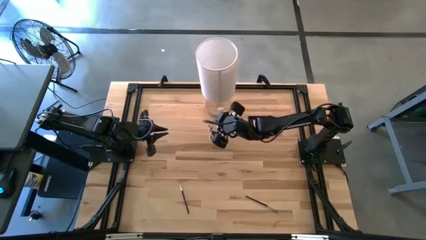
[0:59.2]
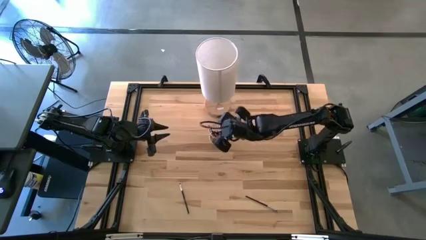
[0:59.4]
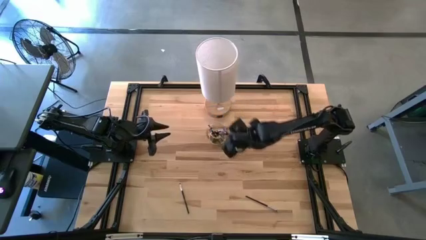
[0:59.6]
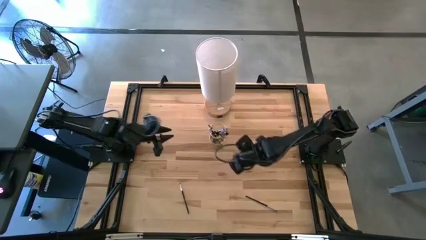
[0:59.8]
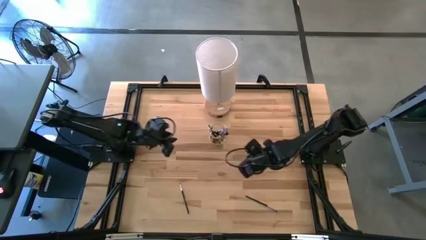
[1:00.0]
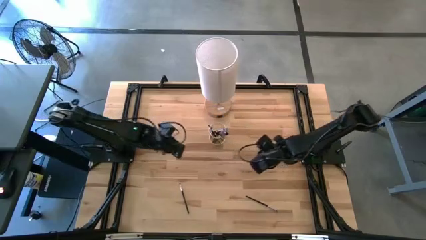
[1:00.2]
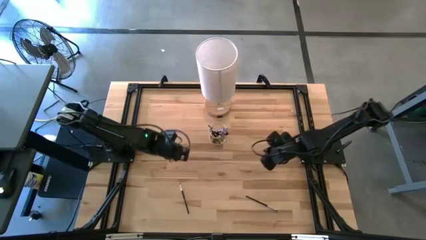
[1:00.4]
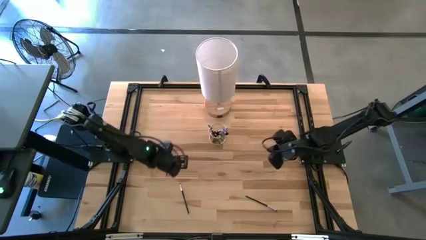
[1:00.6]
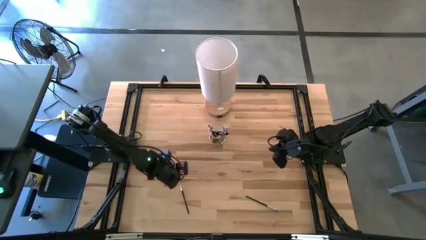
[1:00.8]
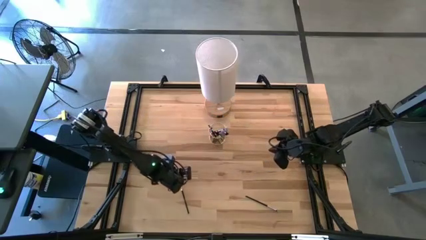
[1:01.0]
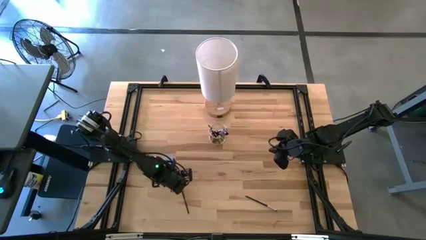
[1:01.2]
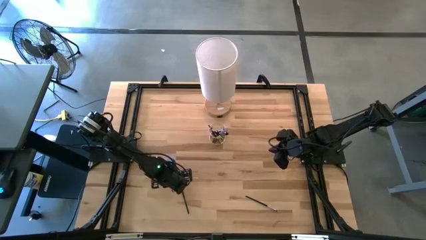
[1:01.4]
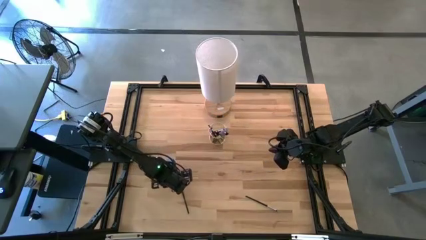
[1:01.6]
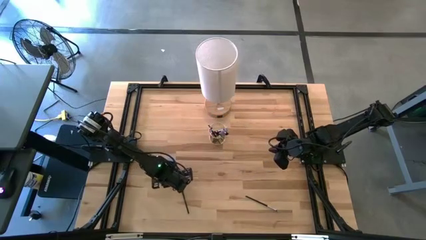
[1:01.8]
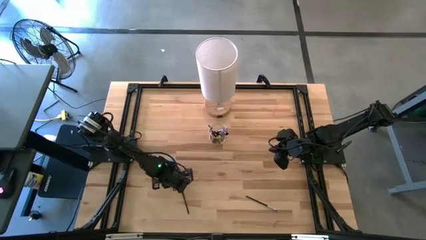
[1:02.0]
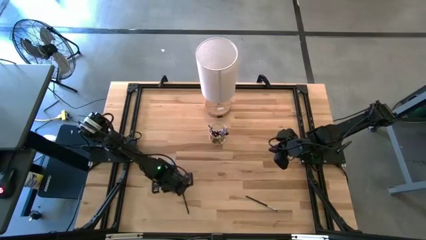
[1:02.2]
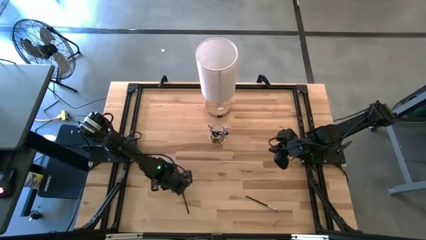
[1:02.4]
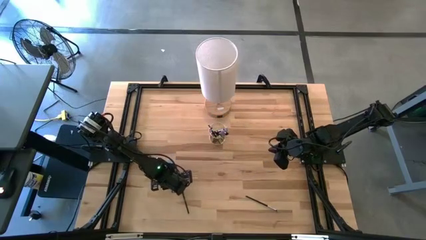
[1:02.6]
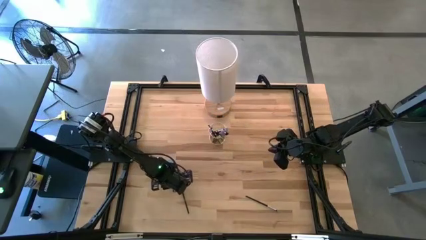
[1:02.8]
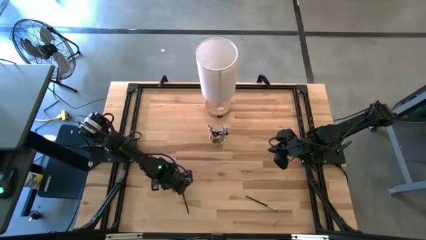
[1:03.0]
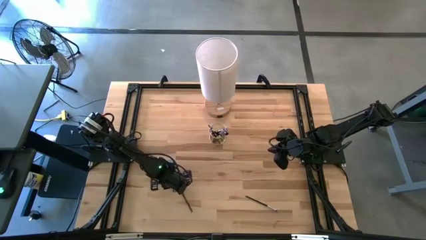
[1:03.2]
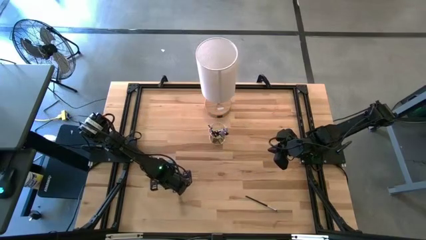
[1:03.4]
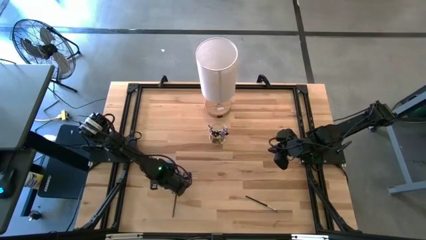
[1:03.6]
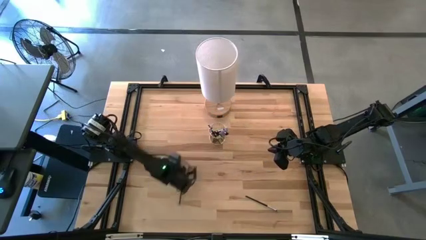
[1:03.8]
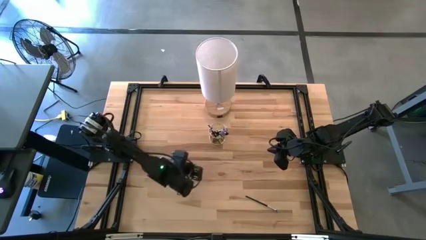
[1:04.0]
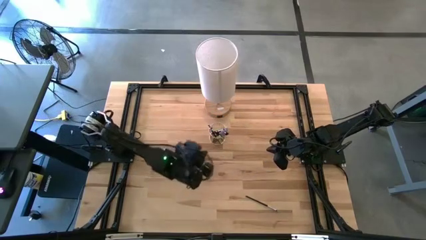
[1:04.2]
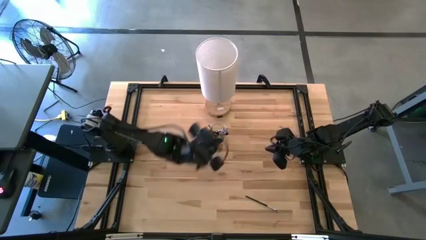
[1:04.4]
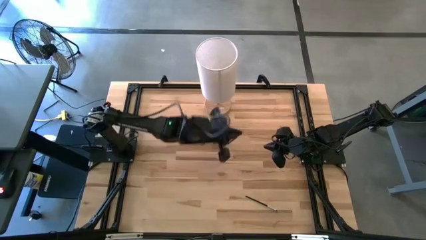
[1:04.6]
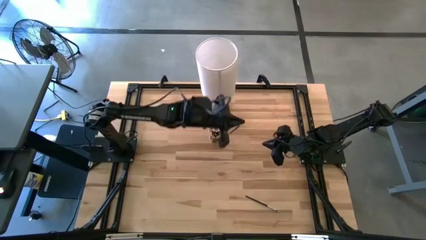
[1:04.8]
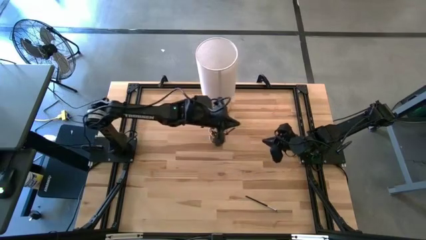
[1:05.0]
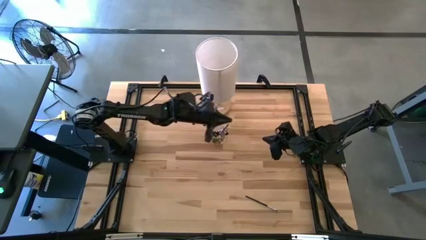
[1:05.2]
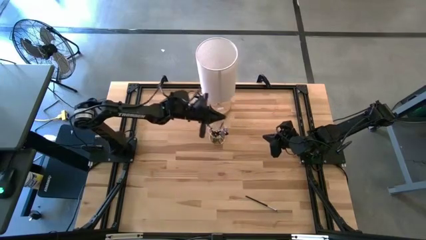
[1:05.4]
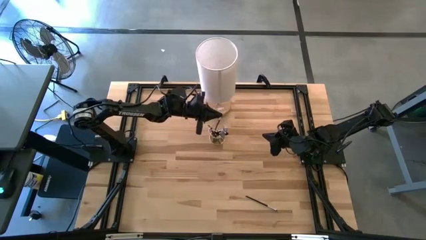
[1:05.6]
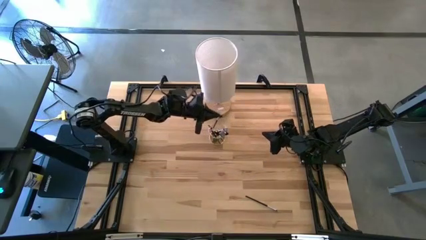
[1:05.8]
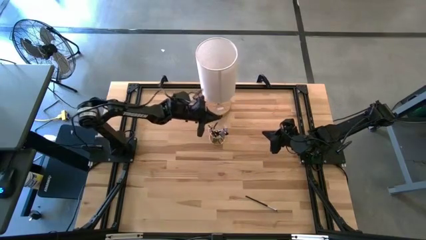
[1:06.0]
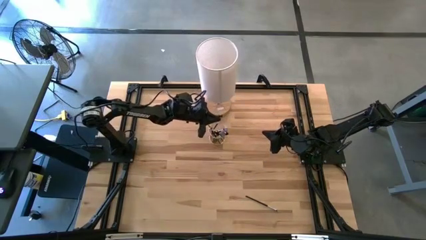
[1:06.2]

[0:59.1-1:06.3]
Task: Put items in baskets/containers
Put the black eyeshadow brush into the gold pen organizer

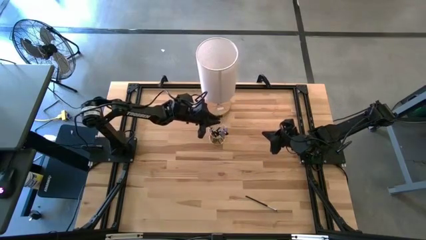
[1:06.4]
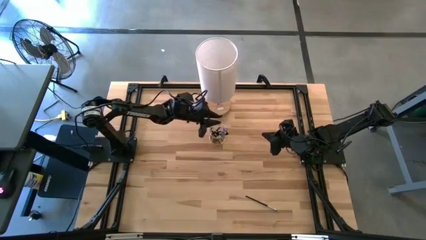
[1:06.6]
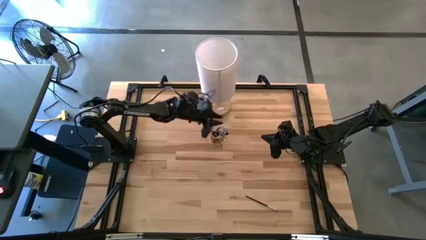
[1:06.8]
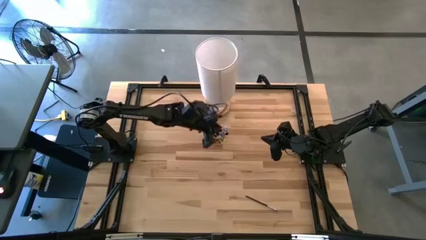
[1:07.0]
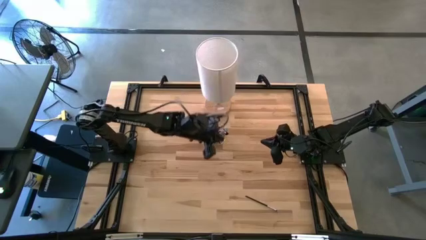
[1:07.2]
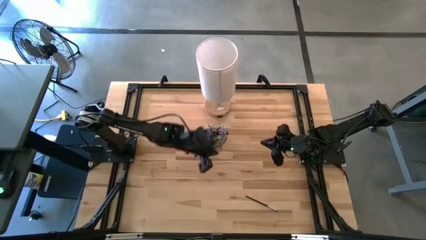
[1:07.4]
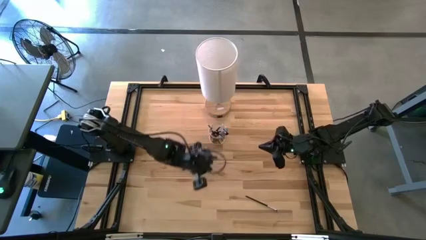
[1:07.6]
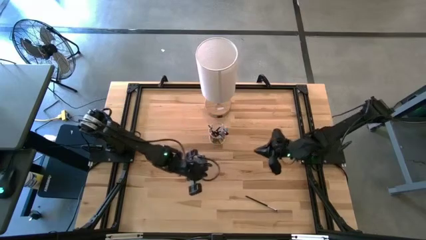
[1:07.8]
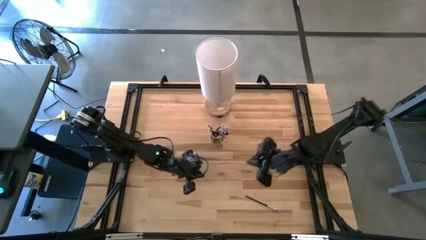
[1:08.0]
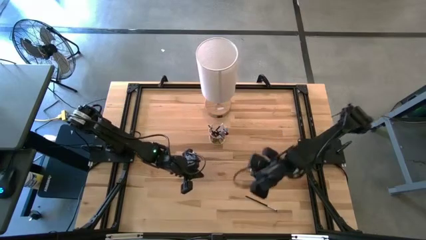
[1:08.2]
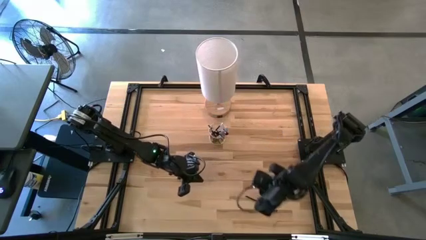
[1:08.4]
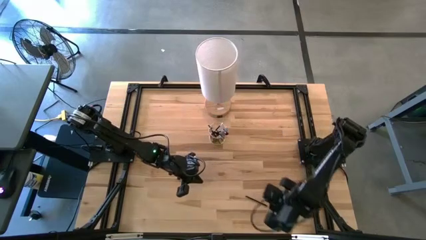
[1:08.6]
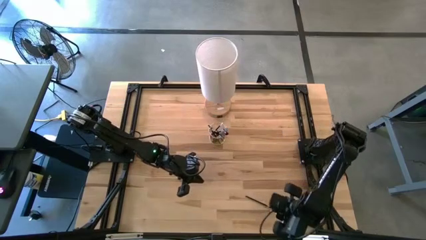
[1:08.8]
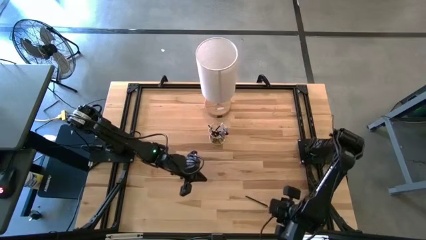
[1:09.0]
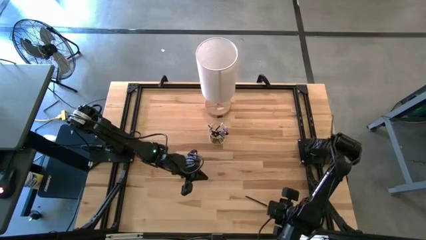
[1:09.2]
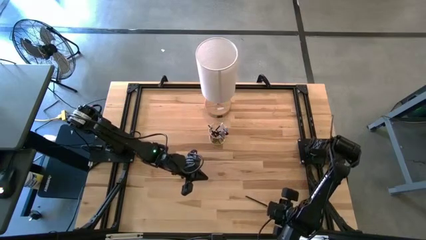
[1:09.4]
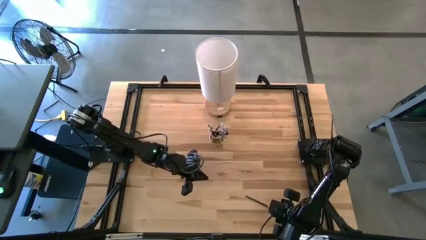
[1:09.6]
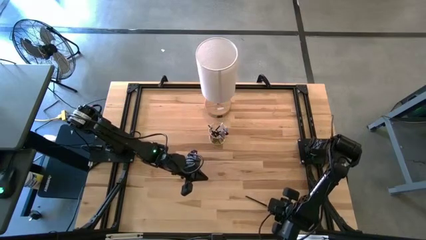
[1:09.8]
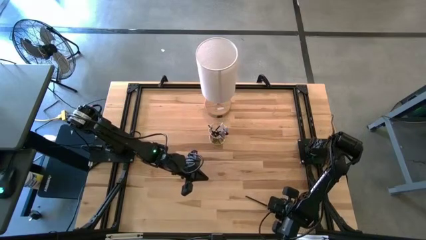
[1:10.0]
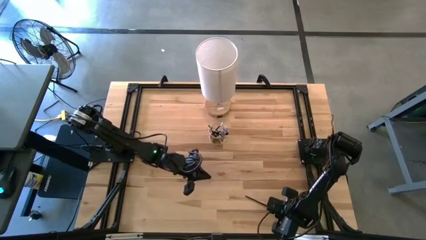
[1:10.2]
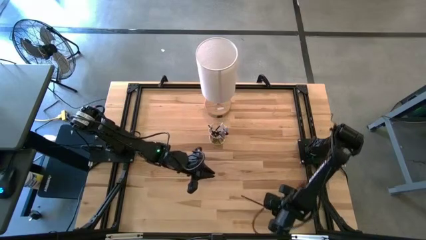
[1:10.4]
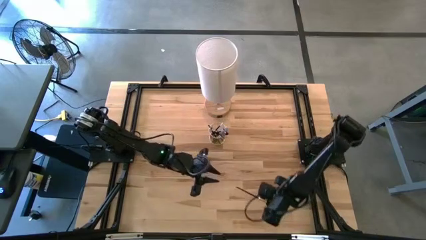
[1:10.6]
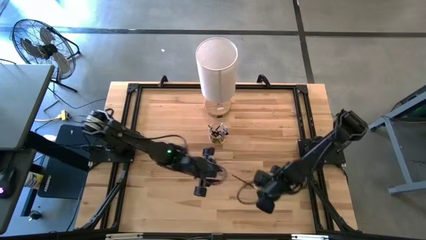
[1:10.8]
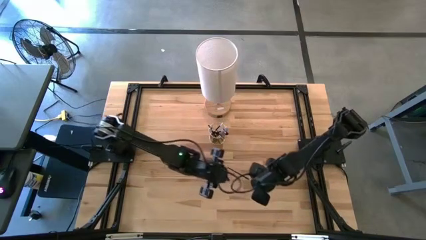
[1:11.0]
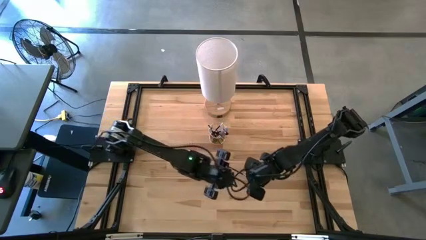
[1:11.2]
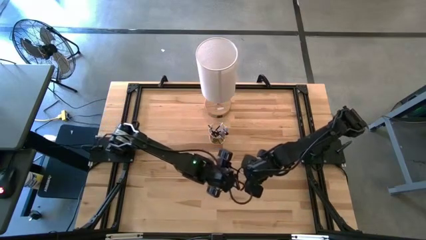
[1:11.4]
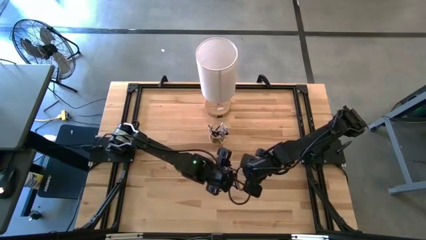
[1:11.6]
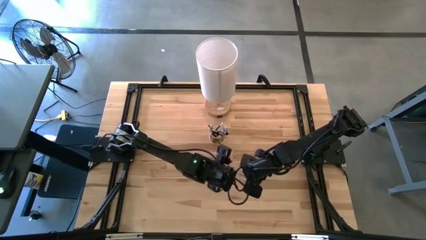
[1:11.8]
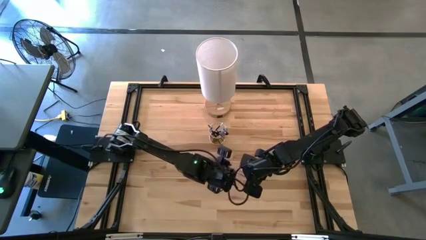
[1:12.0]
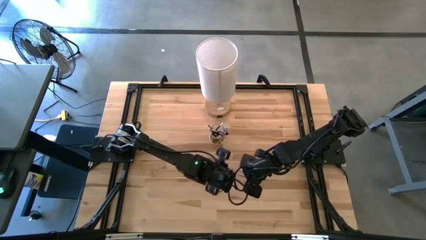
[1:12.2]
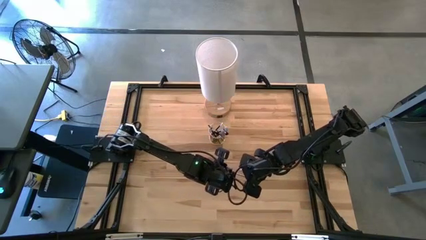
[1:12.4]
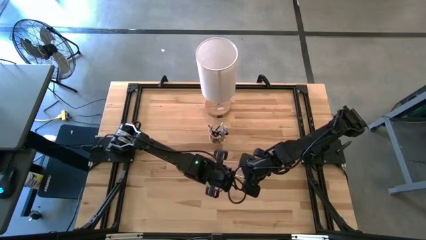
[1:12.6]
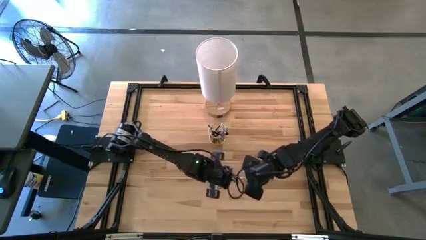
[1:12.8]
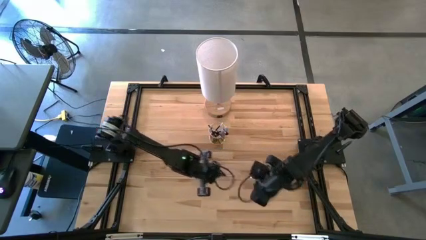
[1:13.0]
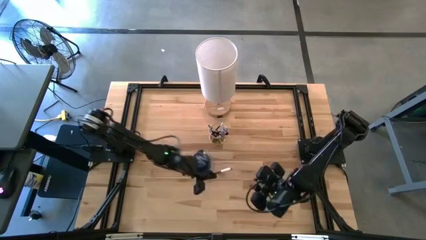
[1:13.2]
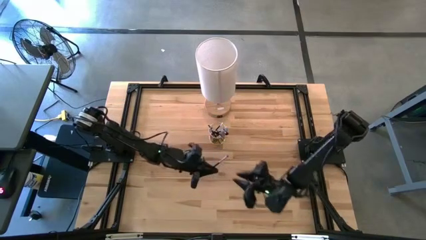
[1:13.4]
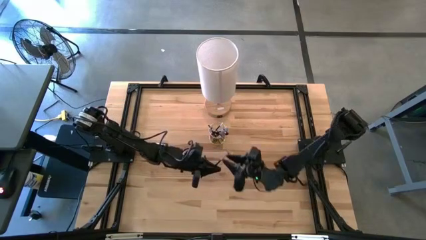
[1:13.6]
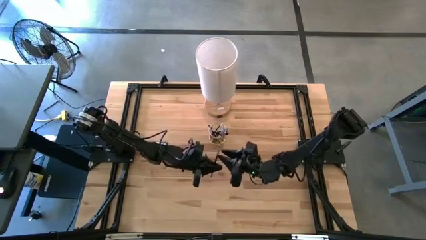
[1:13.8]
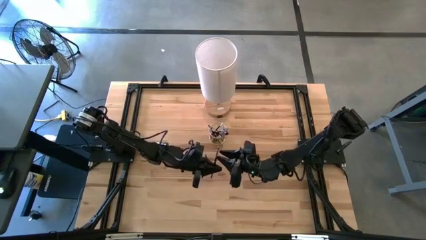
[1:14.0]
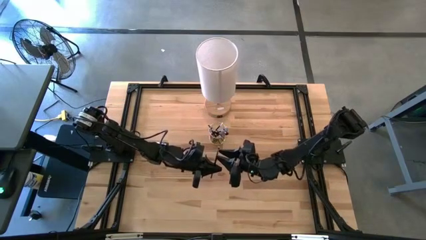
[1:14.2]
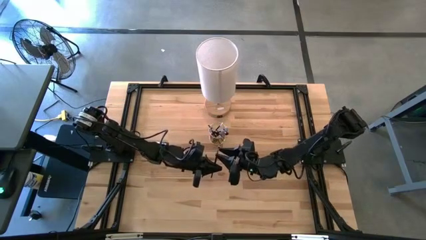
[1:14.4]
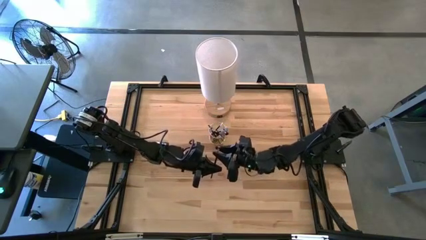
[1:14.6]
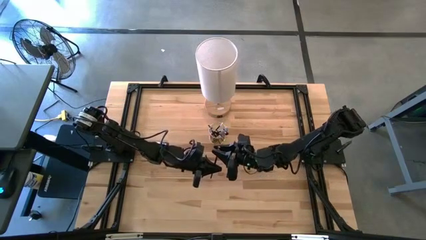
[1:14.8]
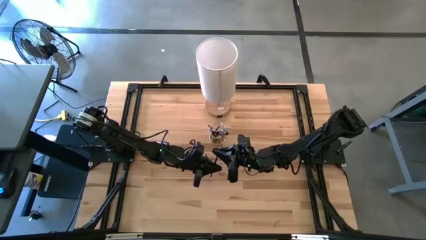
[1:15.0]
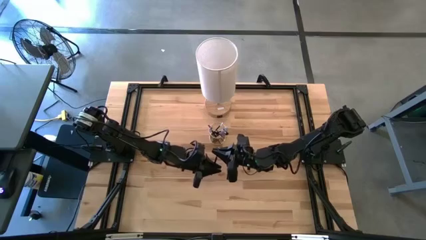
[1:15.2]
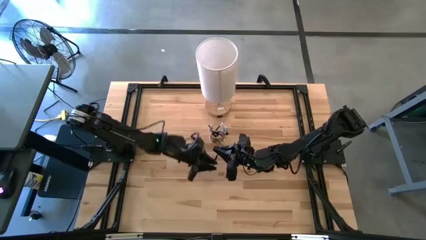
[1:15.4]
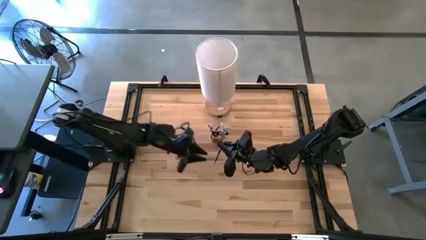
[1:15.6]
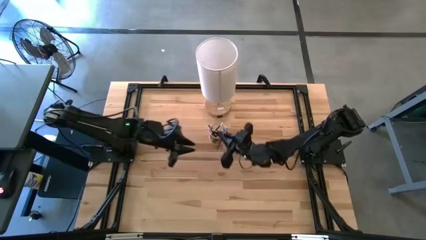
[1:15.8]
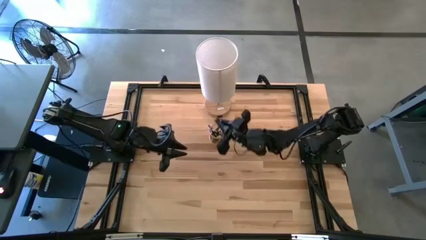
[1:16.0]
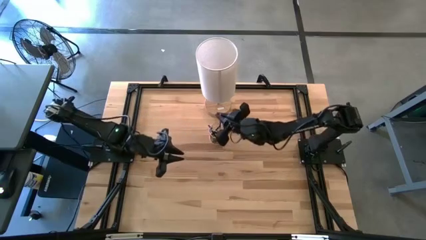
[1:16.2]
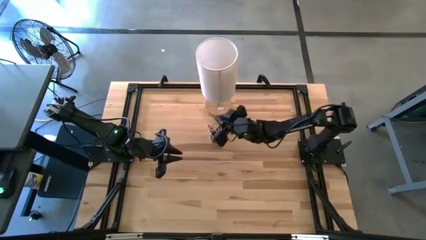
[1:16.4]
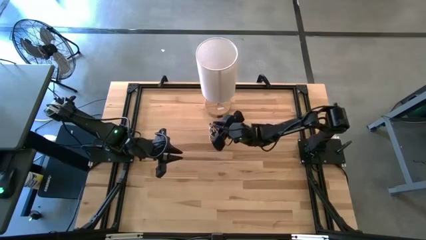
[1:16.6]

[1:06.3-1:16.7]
Put the black eyeshadow brush into the gold pen organizer
